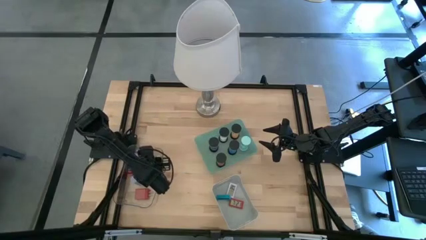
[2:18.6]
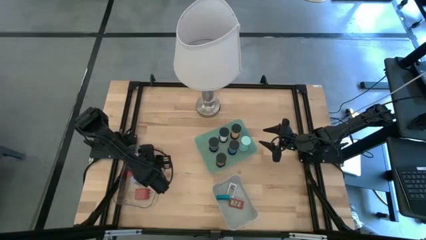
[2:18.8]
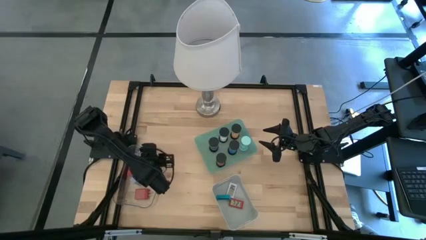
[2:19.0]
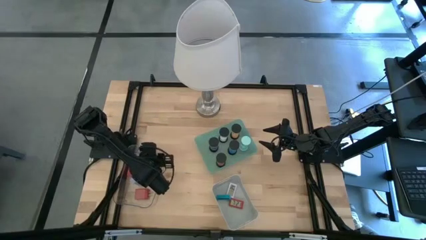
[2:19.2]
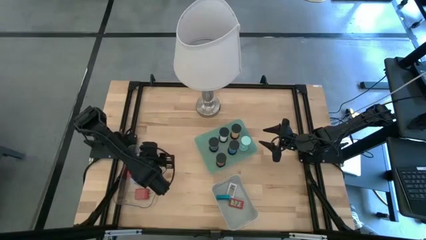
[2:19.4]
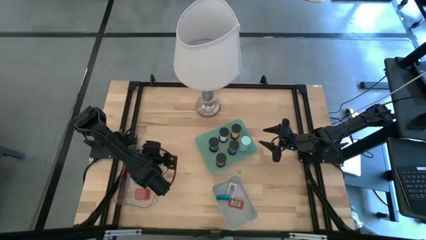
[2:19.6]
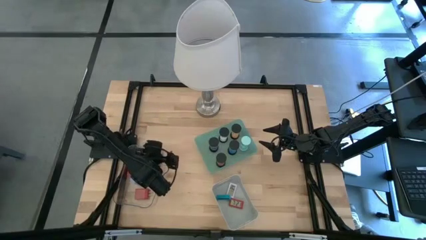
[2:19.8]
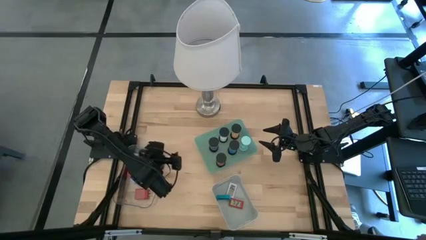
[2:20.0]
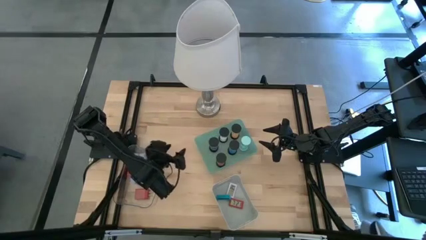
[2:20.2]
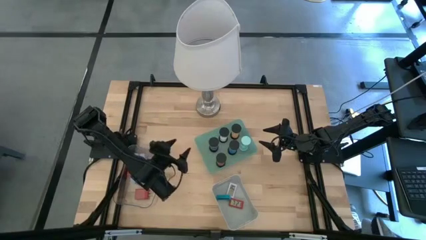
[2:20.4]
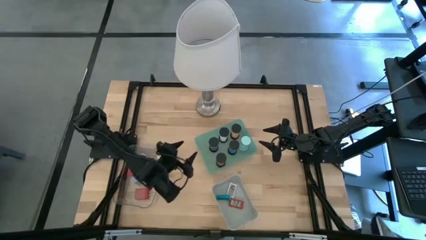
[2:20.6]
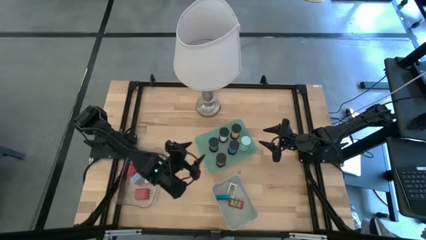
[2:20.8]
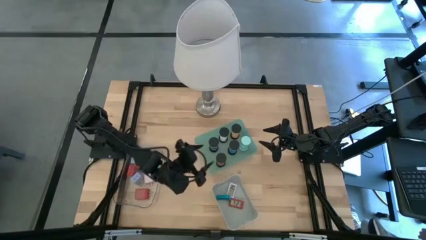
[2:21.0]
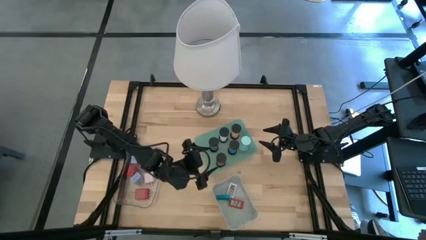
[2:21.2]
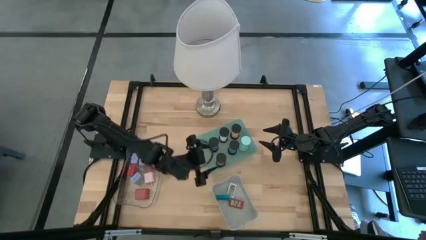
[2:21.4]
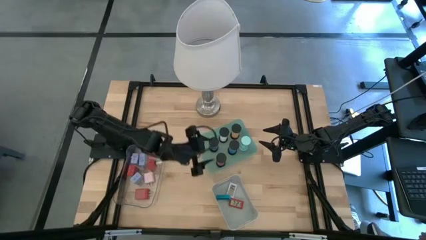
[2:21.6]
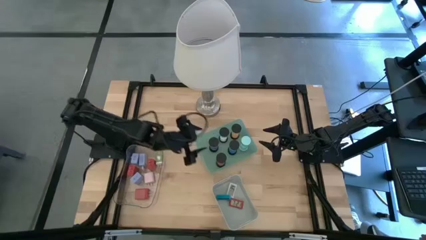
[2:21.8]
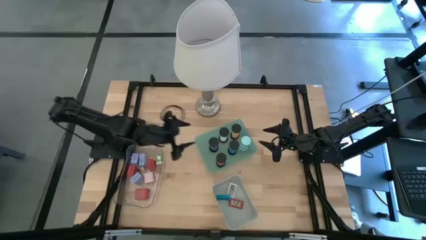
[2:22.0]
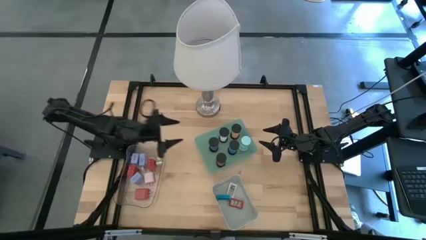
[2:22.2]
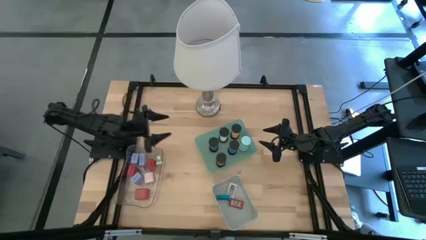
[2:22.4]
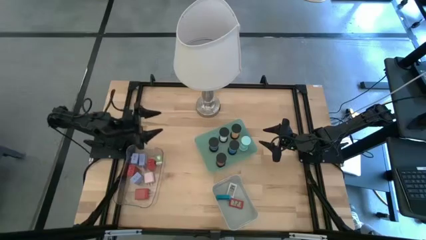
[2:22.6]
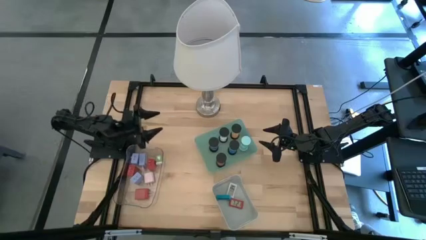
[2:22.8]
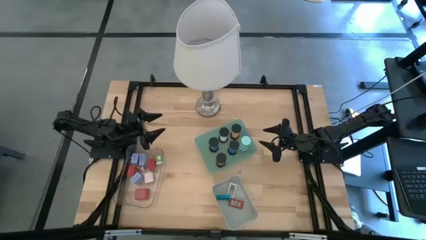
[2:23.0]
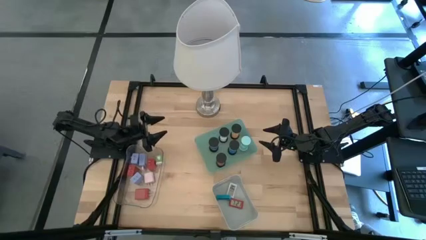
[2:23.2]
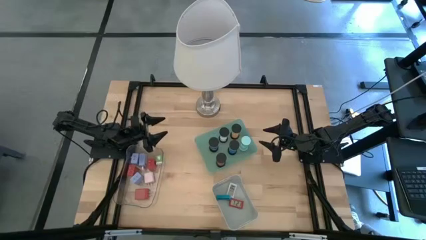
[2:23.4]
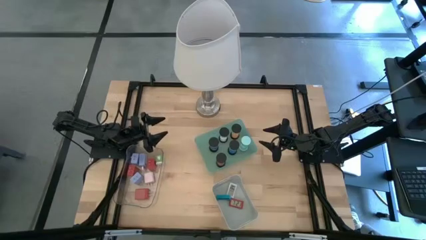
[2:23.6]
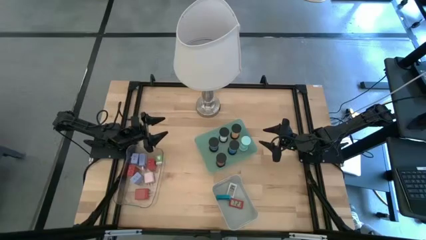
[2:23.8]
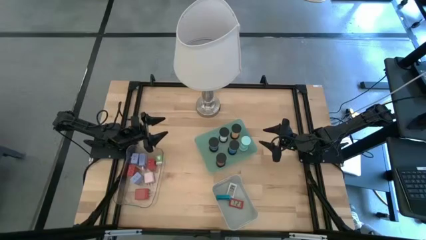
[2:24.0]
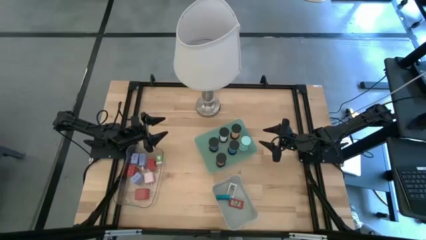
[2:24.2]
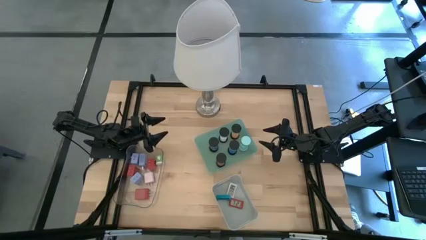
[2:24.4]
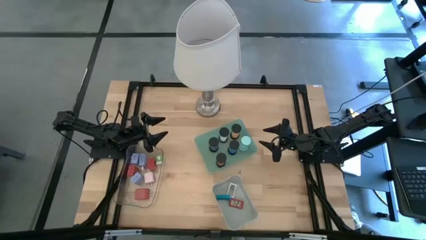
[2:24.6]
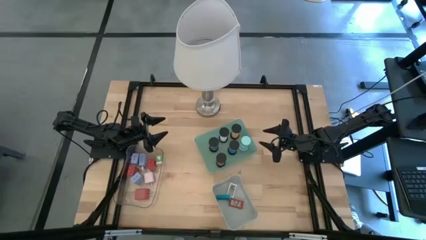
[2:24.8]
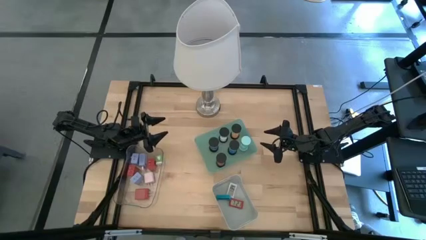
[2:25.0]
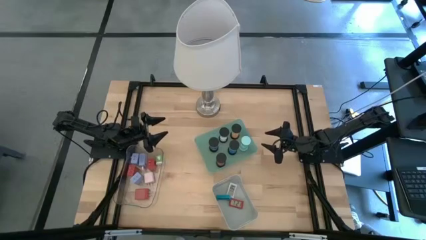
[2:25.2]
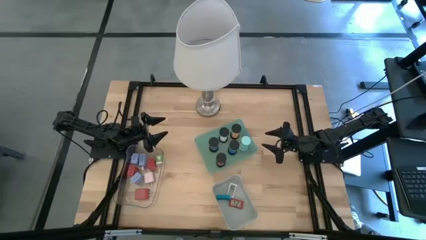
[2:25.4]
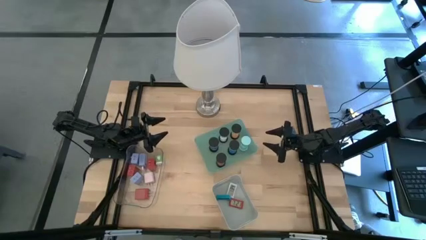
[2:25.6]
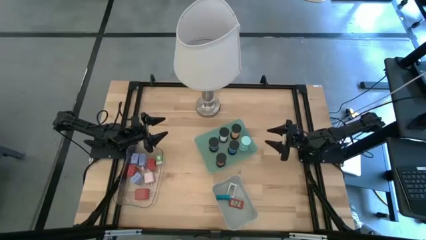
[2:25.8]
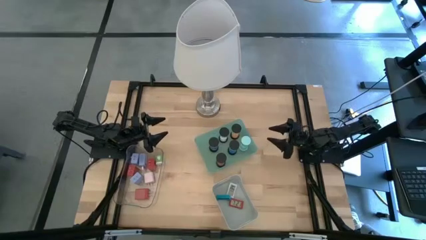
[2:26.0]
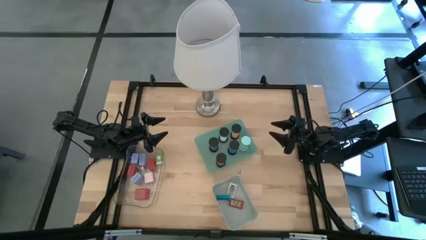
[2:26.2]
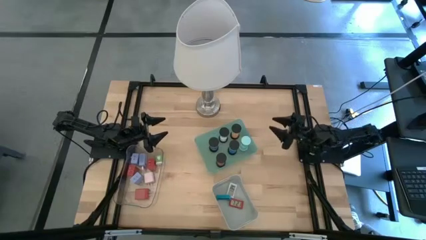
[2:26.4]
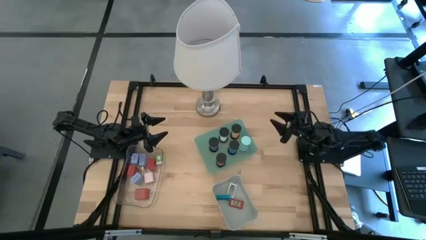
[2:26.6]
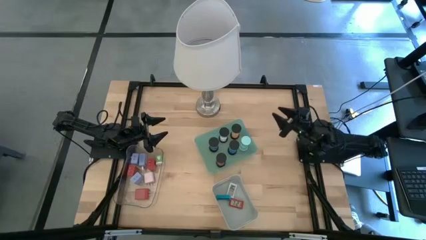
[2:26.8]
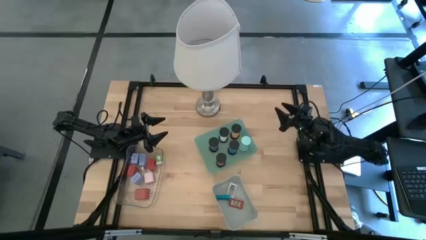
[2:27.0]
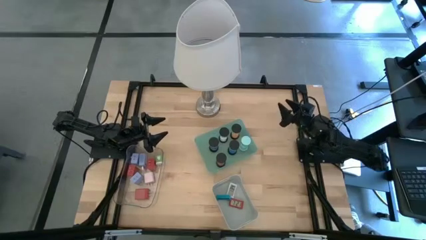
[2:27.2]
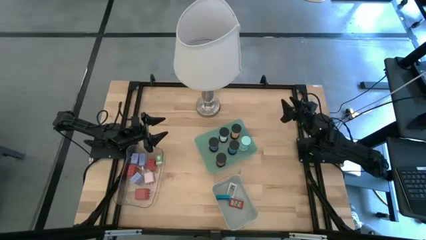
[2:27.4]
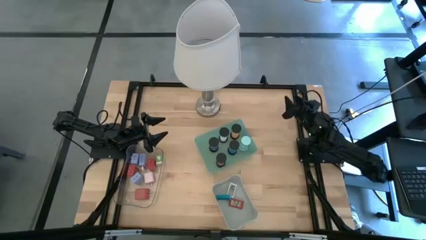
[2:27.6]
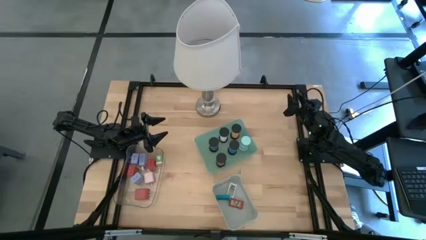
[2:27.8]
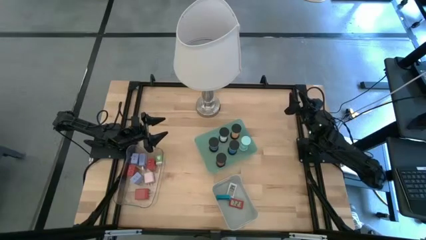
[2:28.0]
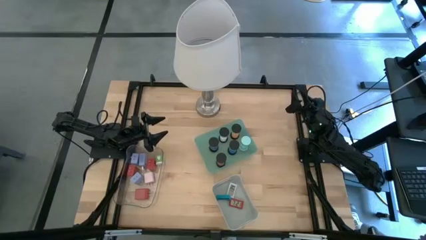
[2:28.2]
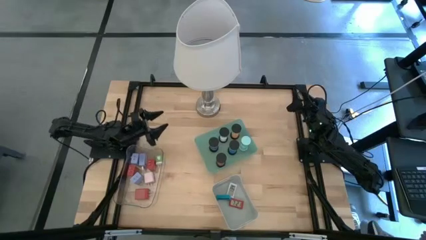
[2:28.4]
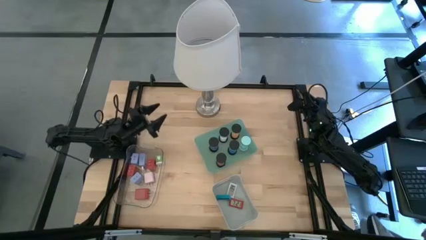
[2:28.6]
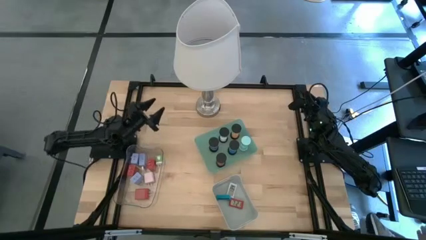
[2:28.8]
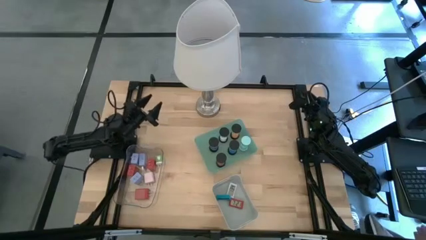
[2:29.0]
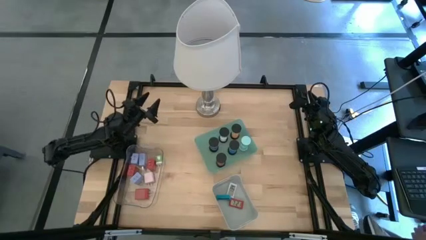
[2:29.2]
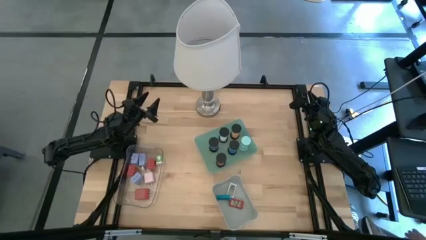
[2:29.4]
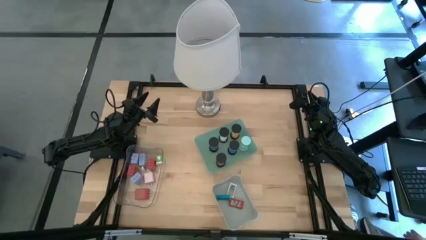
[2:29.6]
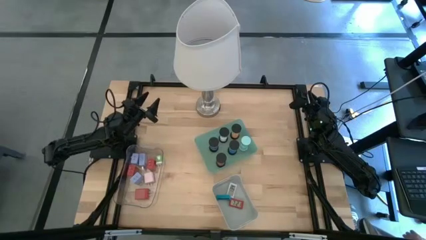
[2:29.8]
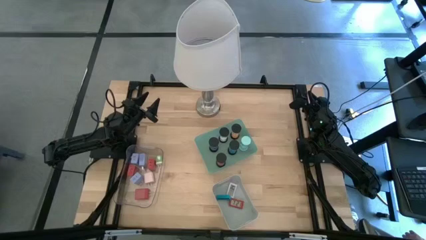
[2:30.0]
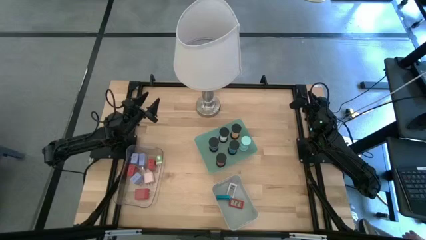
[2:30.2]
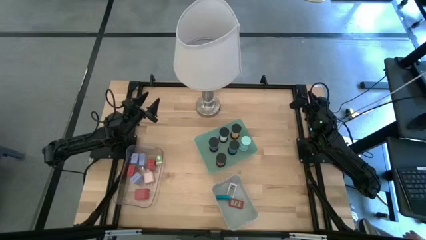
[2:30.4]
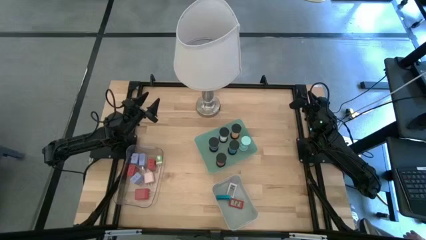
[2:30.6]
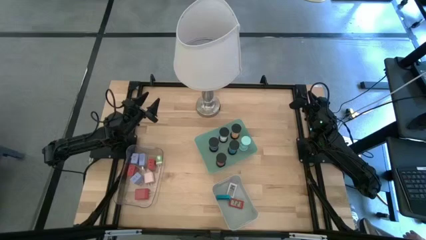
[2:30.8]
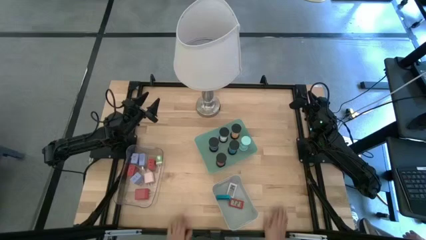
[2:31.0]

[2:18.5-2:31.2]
Task: Pick & Place Office items
Return to Home Position

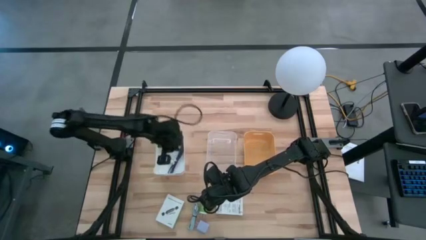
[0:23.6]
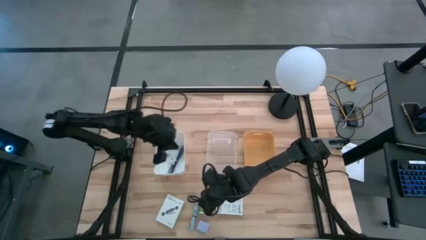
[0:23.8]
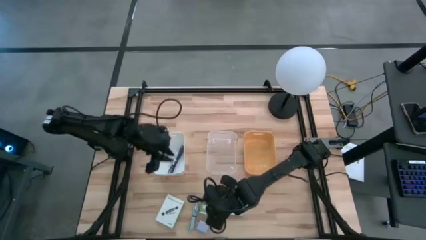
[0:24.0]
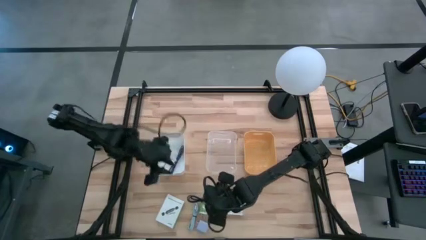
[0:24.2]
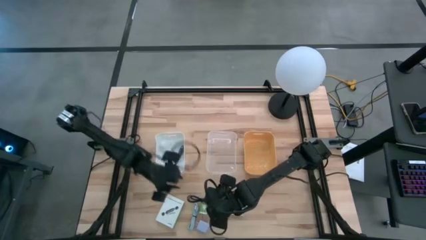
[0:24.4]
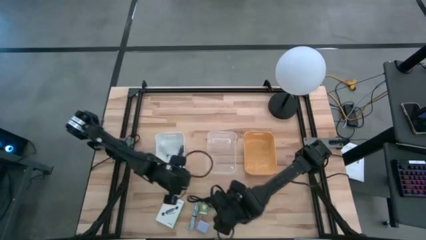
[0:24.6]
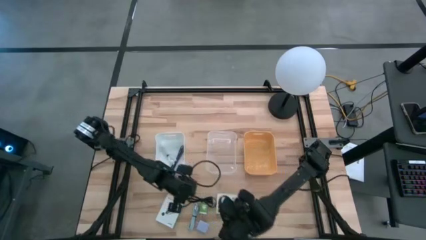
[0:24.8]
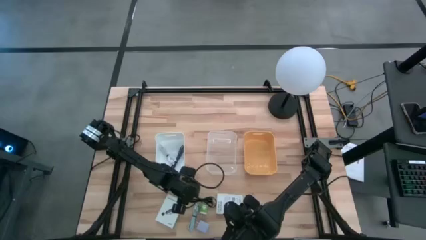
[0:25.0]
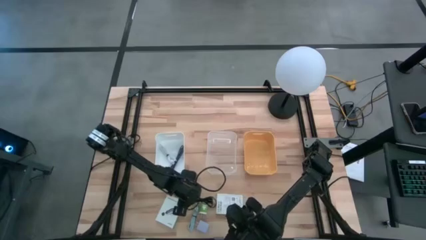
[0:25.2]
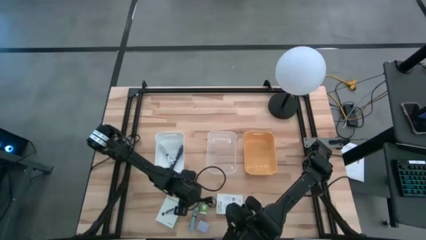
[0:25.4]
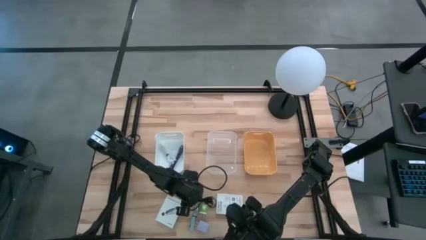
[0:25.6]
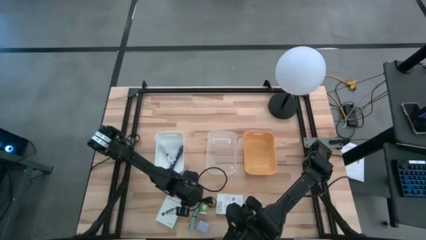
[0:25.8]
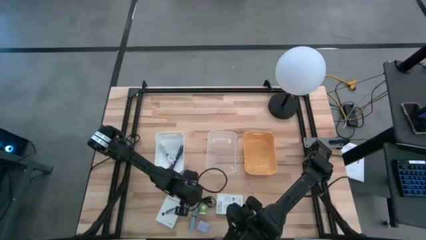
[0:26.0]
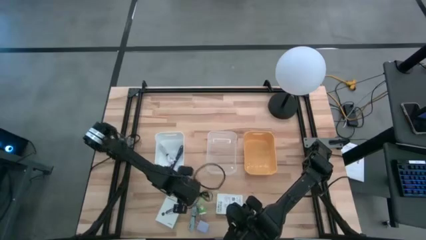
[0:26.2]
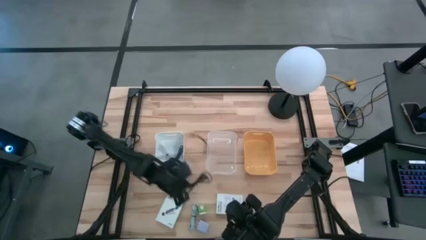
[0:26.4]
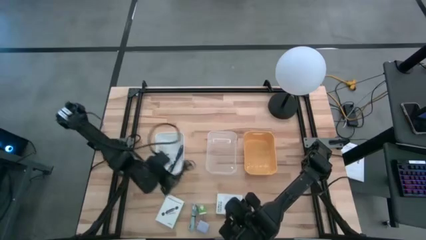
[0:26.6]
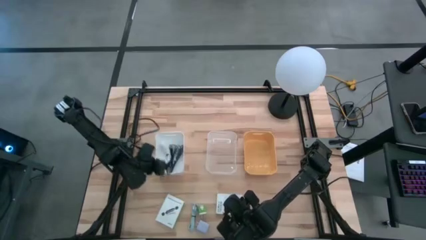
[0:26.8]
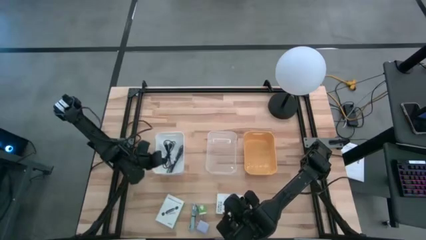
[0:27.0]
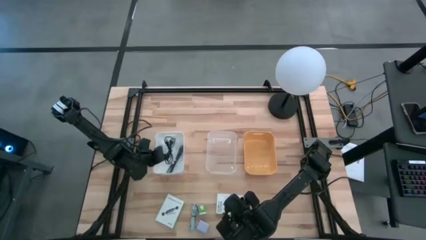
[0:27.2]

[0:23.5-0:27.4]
Task: Pick and place items into bin
Put the black charger cable into the white bin
